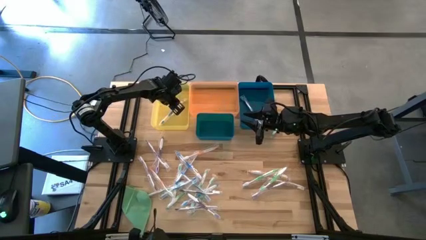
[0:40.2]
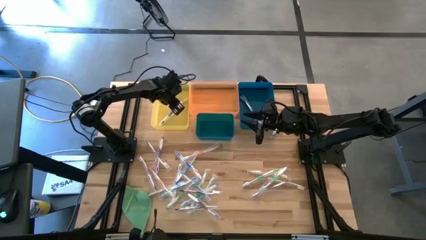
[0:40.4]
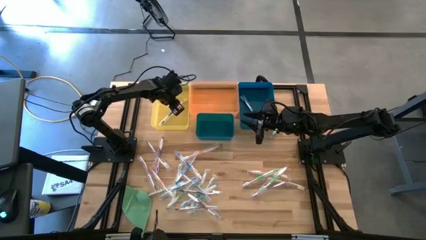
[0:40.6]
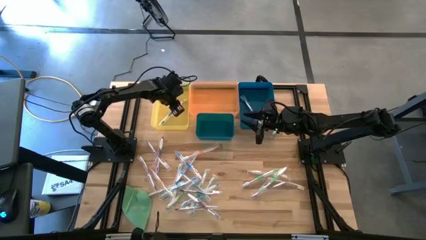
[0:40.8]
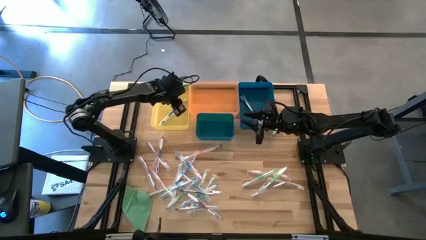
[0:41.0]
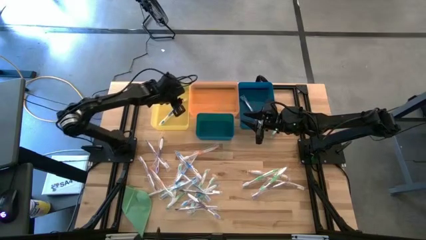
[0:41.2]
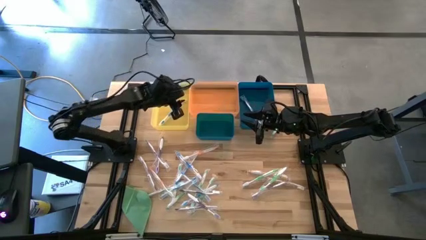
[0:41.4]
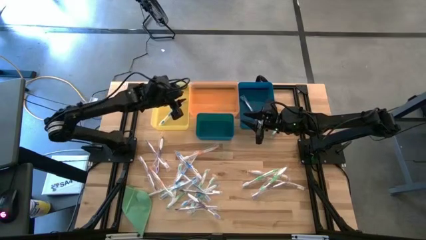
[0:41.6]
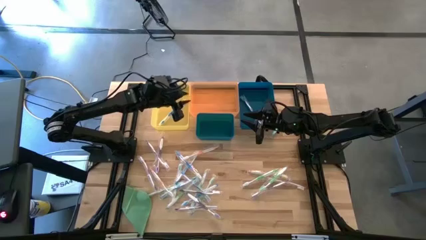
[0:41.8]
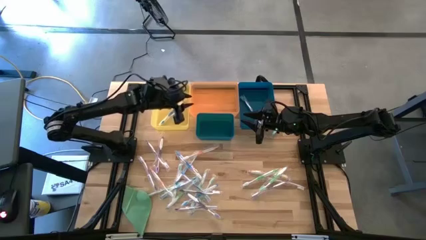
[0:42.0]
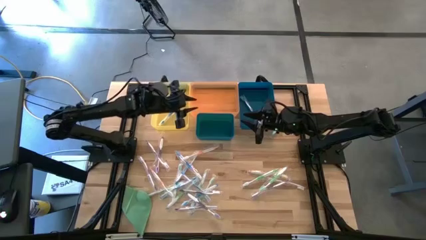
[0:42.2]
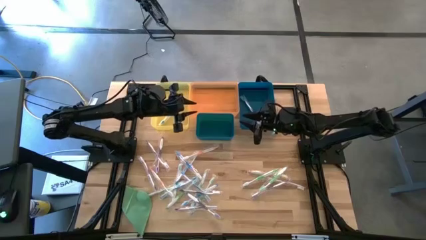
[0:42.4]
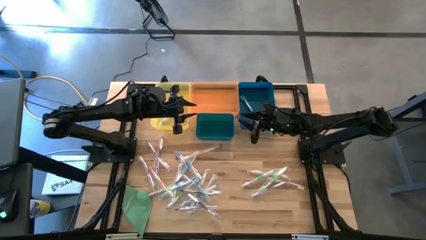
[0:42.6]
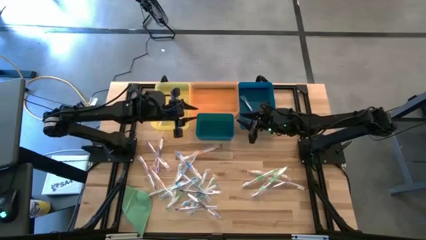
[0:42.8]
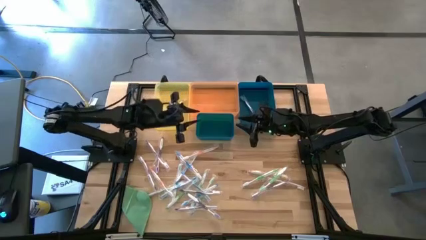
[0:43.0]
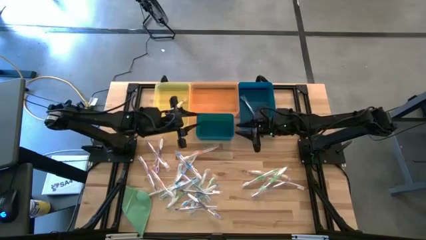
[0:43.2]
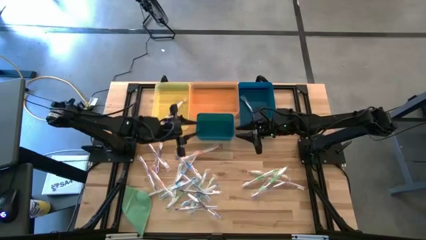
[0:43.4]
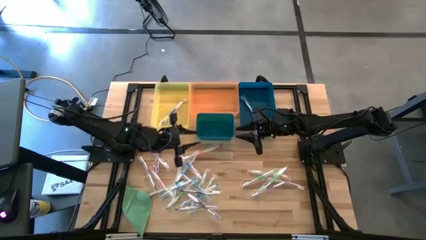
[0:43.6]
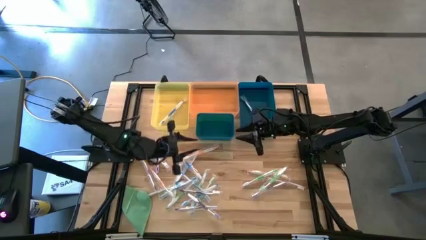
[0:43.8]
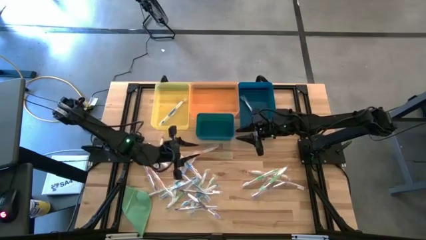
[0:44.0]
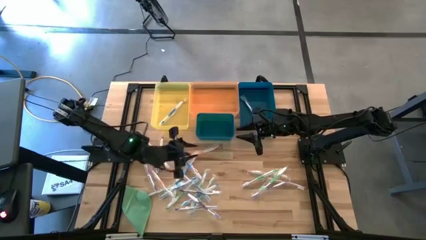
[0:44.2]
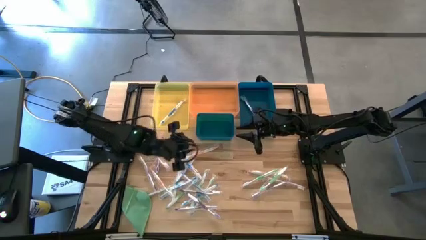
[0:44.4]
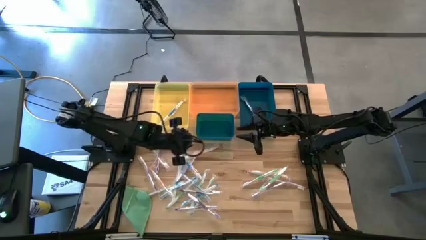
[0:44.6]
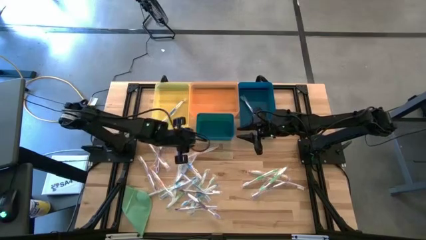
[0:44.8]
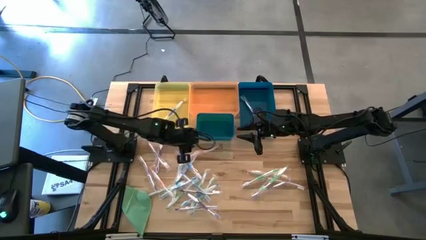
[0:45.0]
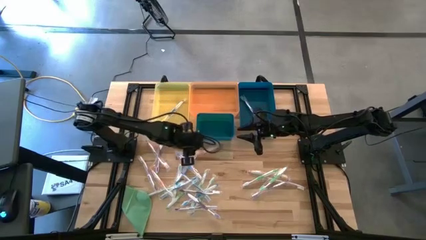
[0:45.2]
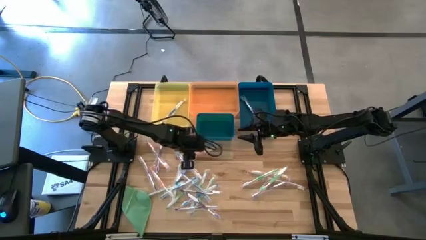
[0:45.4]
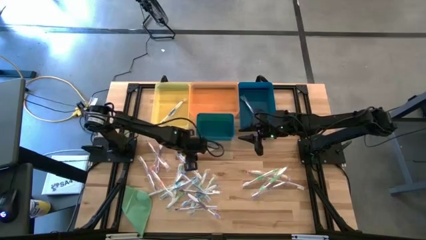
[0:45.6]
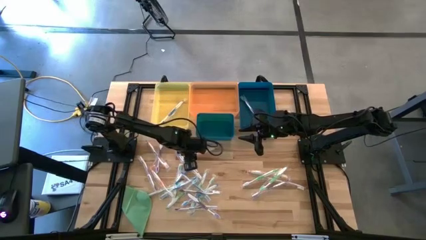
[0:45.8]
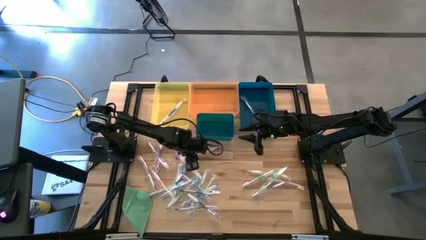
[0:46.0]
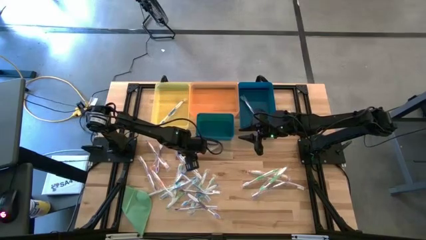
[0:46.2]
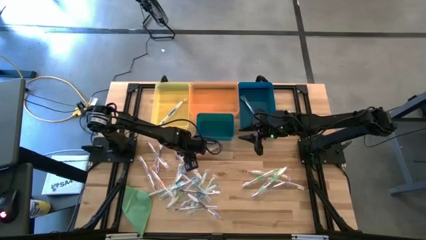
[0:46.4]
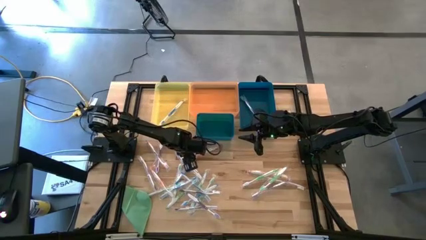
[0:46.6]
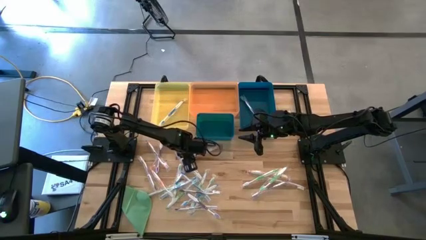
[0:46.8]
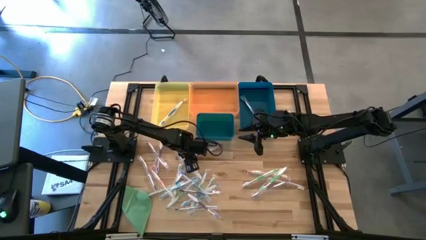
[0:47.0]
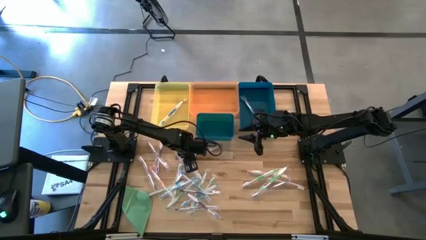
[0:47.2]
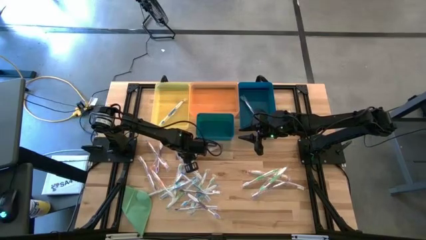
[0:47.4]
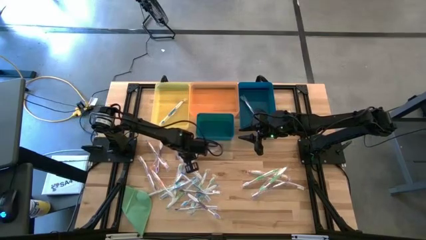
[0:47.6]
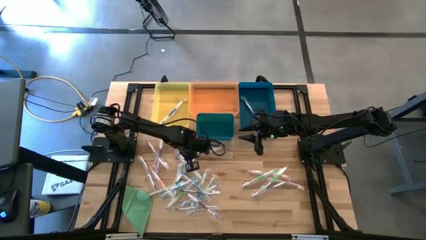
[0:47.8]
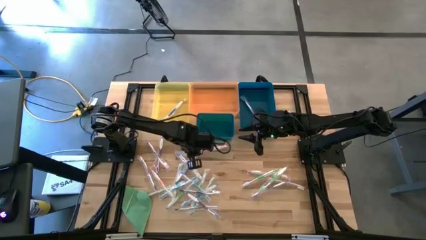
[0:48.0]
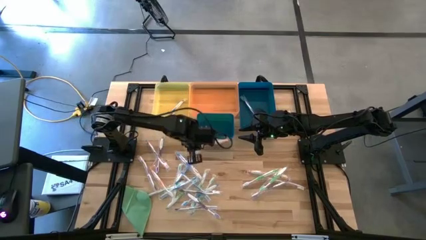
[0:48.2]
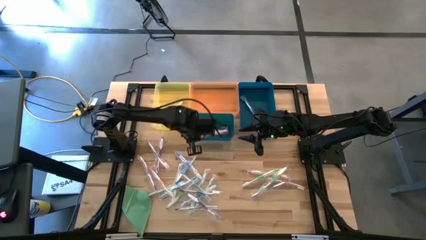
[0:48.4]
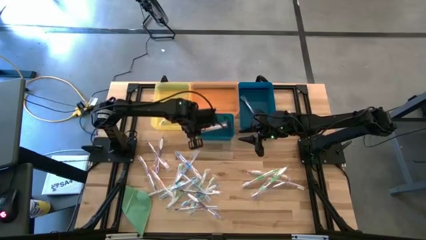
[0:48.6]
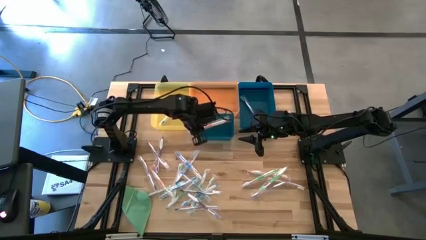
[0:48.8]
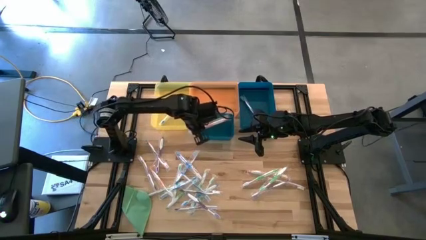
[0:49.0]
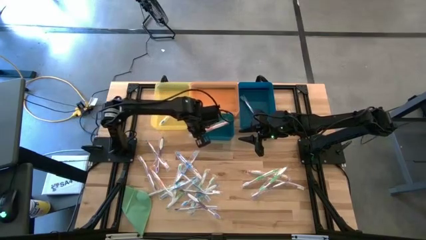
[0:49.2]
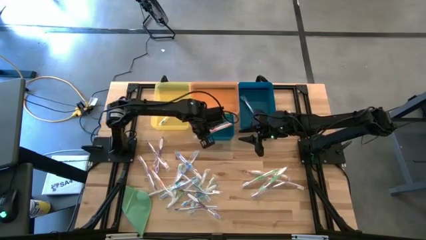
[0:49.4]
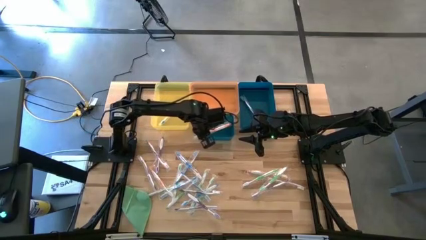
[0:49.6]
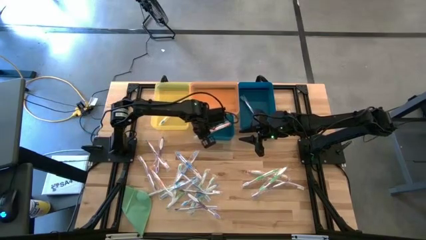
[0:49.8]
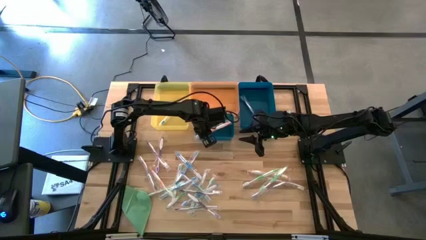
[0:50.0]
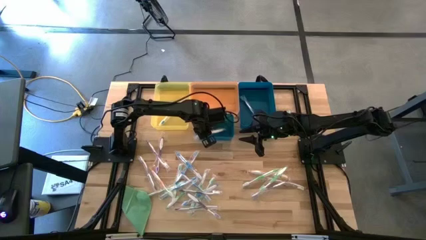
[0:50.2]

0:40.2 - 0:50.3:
Task: Pick & Place Toothbrushes
Put the orange toothbrush into the dark green bin
